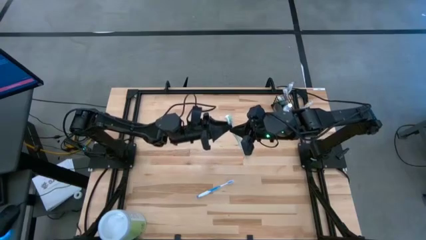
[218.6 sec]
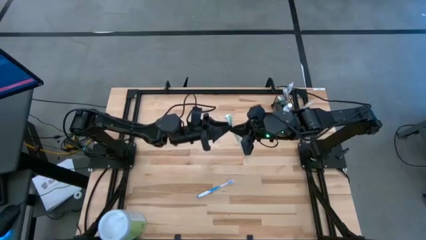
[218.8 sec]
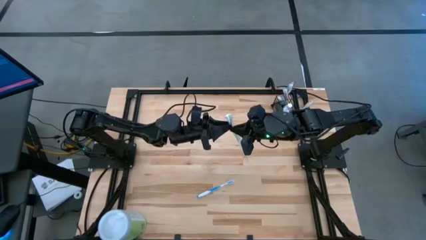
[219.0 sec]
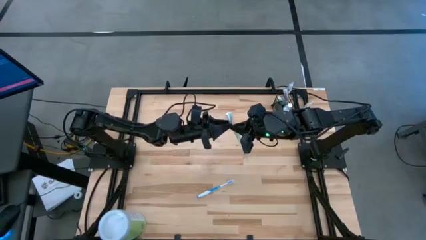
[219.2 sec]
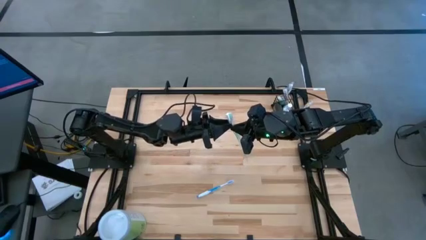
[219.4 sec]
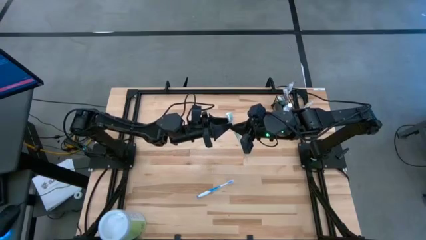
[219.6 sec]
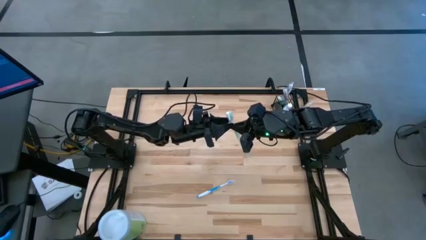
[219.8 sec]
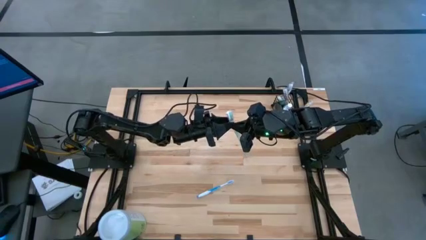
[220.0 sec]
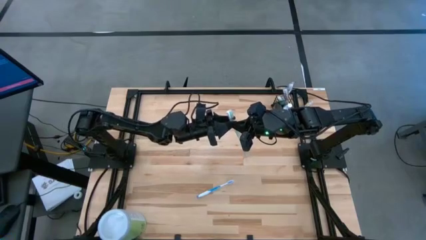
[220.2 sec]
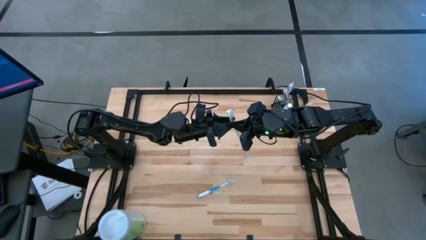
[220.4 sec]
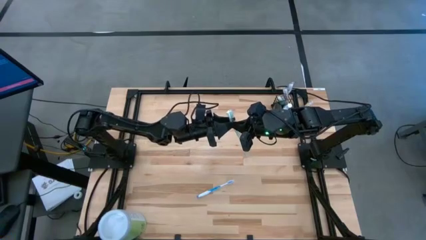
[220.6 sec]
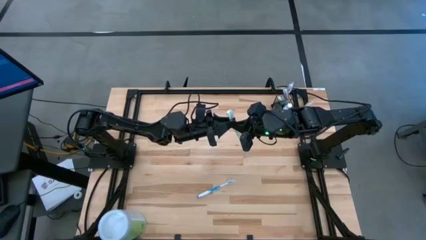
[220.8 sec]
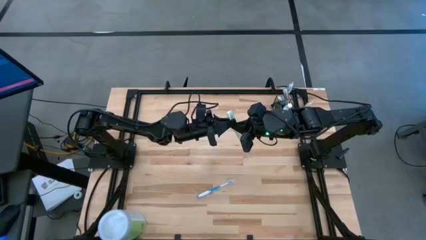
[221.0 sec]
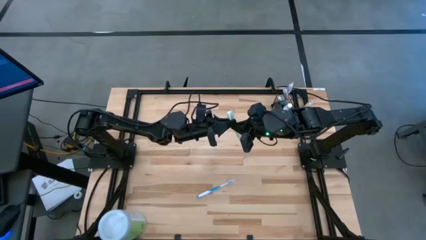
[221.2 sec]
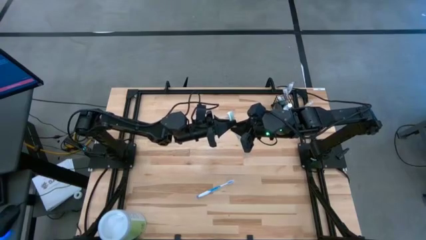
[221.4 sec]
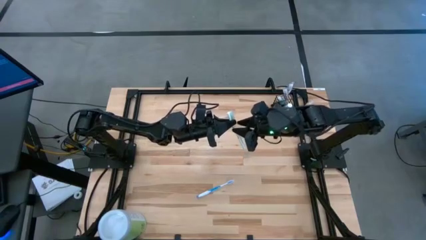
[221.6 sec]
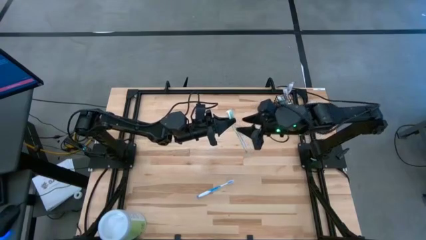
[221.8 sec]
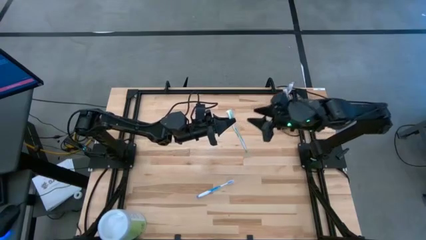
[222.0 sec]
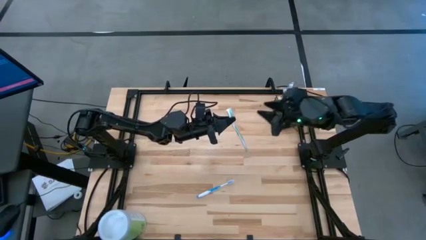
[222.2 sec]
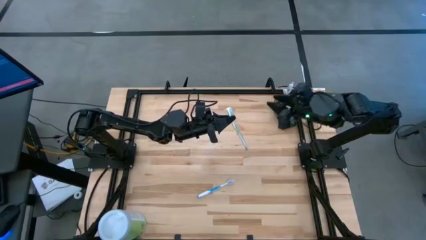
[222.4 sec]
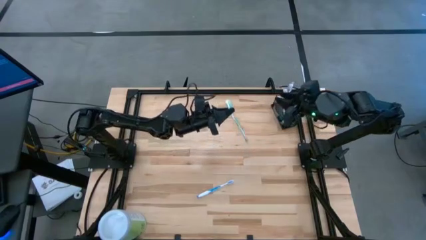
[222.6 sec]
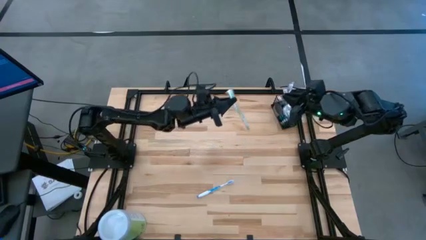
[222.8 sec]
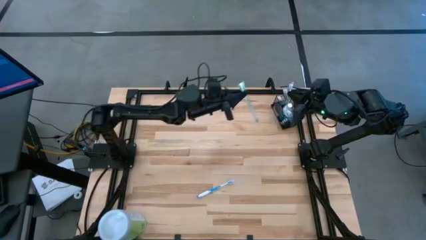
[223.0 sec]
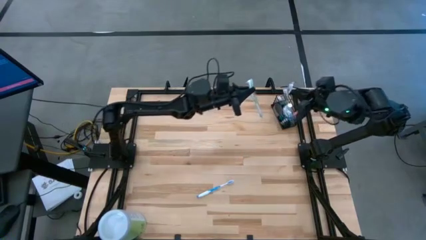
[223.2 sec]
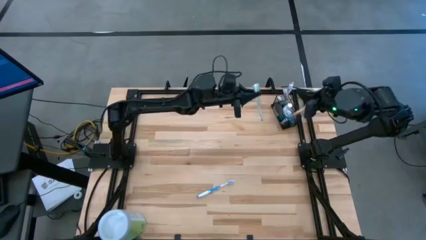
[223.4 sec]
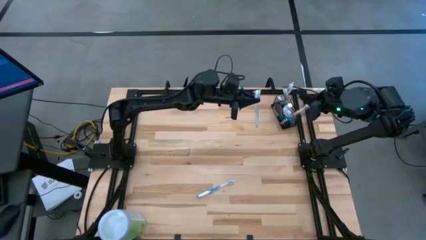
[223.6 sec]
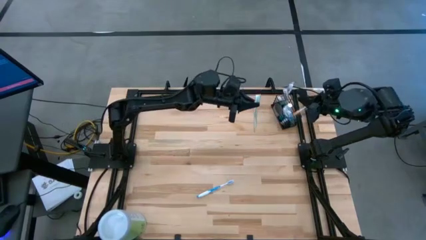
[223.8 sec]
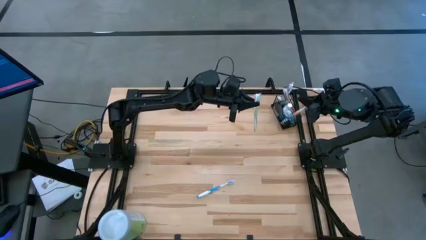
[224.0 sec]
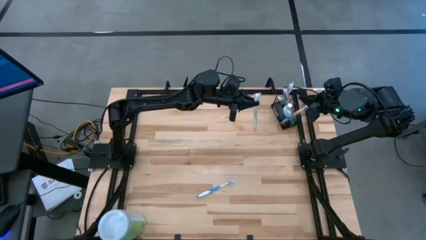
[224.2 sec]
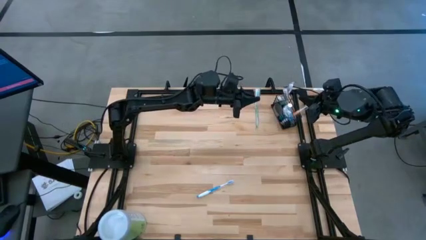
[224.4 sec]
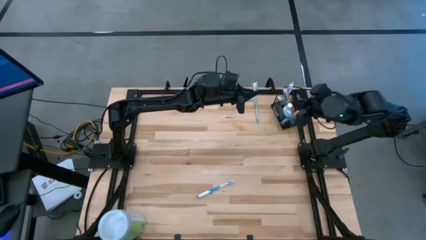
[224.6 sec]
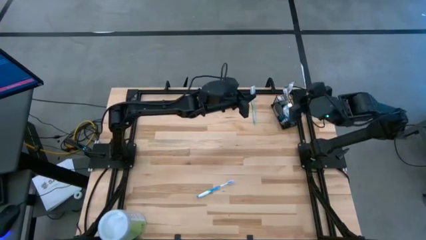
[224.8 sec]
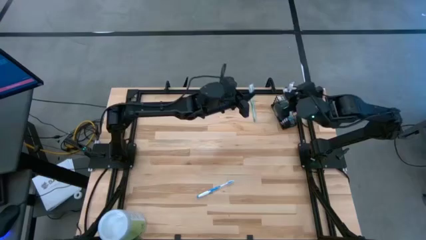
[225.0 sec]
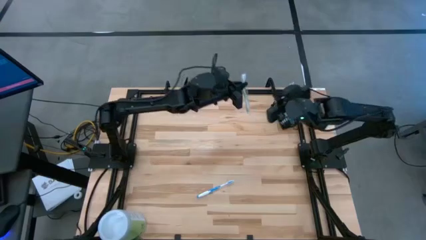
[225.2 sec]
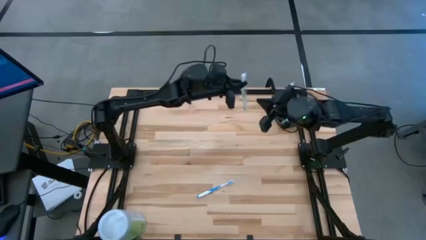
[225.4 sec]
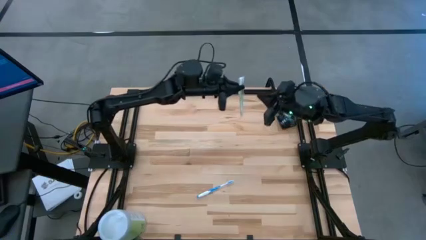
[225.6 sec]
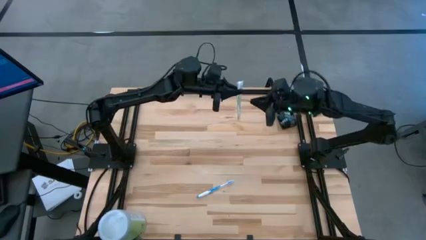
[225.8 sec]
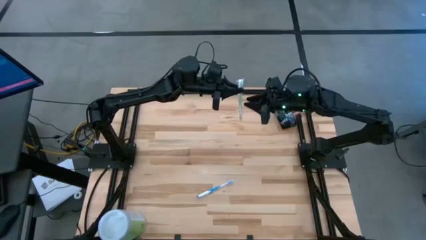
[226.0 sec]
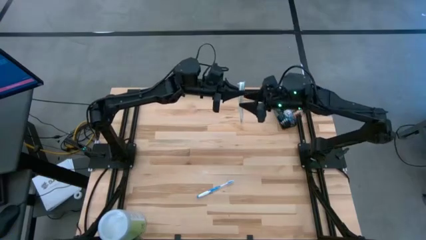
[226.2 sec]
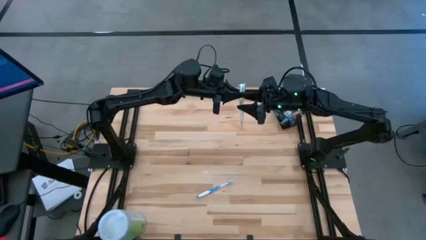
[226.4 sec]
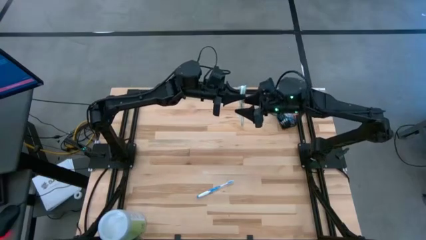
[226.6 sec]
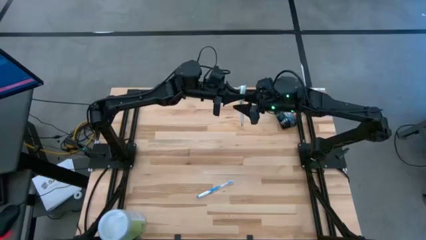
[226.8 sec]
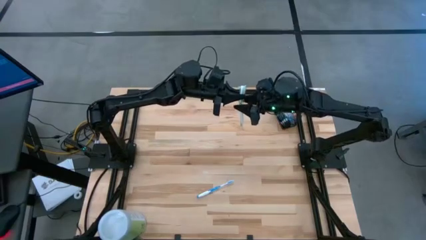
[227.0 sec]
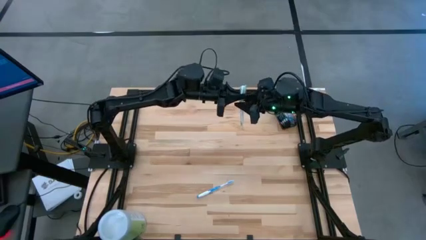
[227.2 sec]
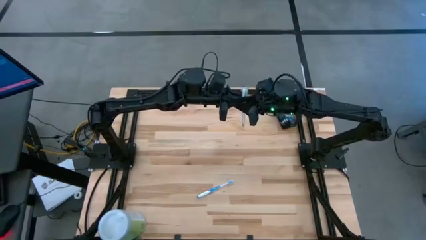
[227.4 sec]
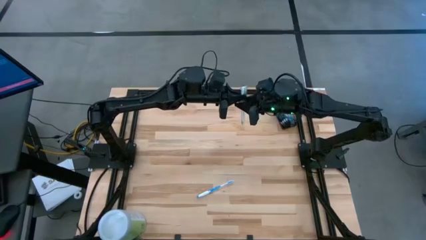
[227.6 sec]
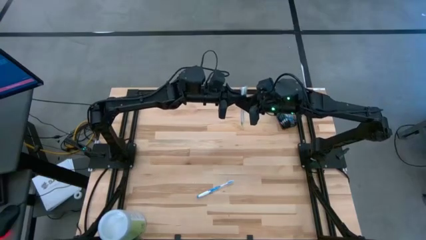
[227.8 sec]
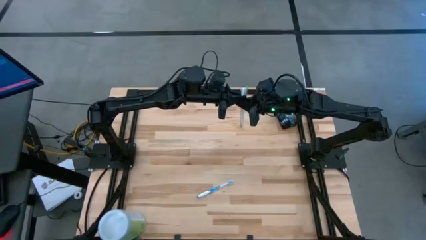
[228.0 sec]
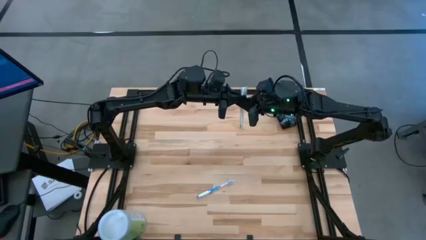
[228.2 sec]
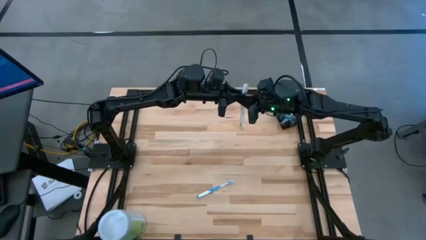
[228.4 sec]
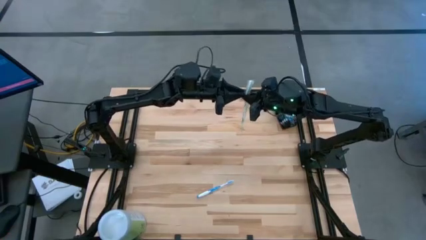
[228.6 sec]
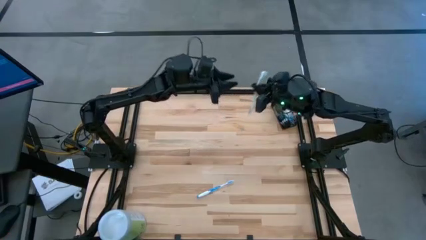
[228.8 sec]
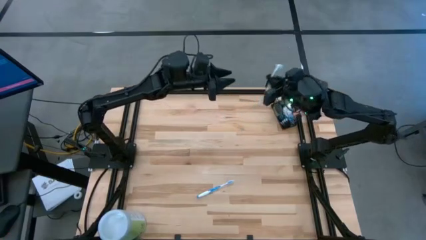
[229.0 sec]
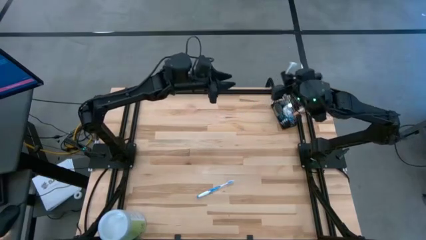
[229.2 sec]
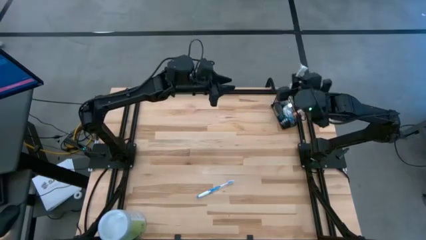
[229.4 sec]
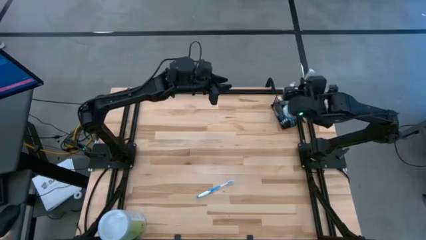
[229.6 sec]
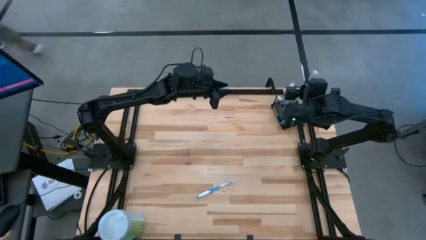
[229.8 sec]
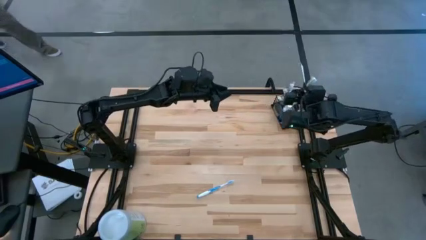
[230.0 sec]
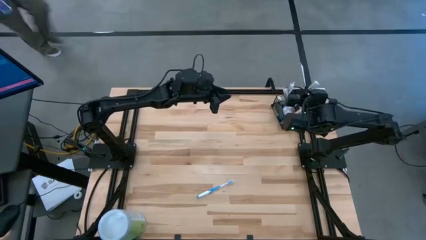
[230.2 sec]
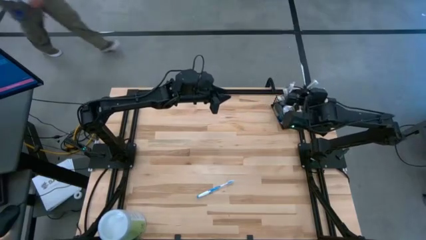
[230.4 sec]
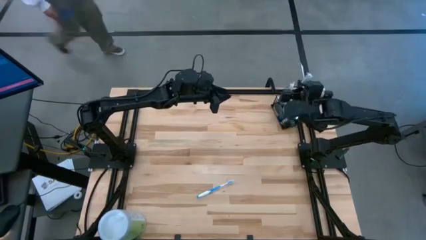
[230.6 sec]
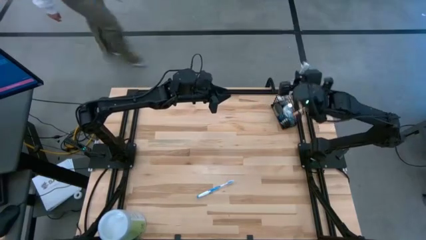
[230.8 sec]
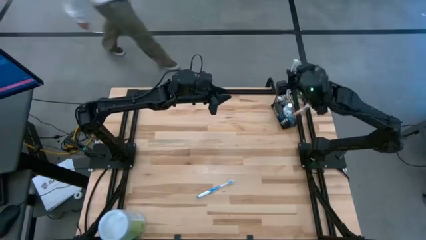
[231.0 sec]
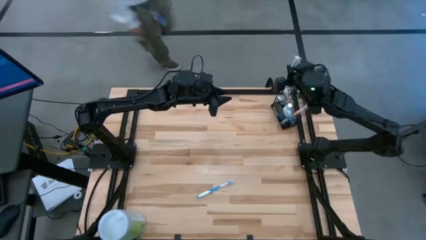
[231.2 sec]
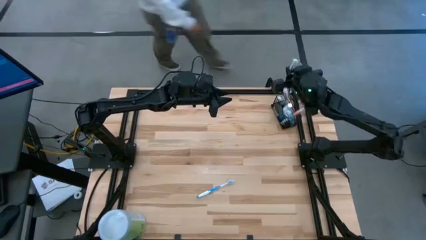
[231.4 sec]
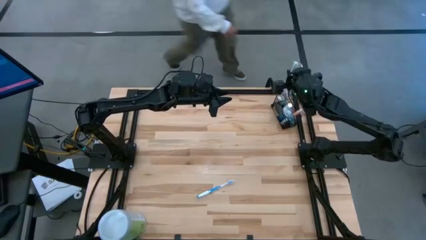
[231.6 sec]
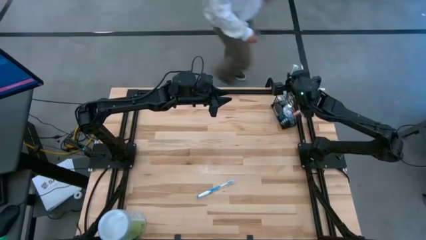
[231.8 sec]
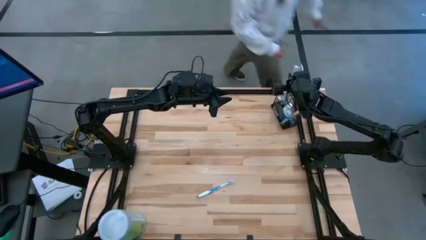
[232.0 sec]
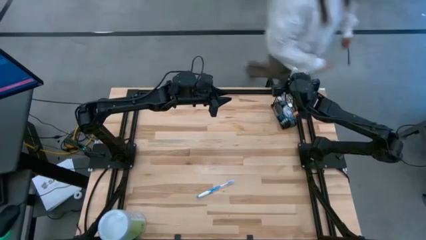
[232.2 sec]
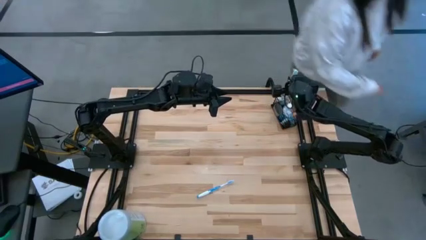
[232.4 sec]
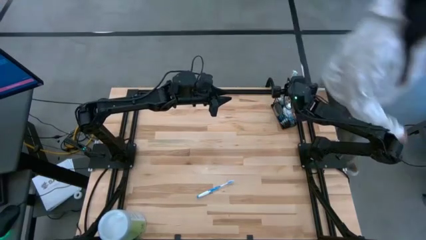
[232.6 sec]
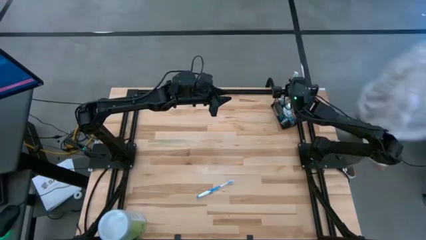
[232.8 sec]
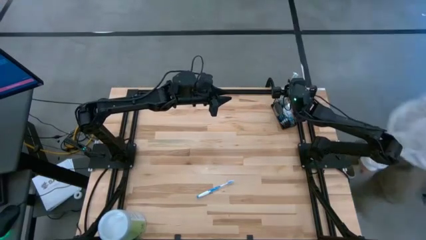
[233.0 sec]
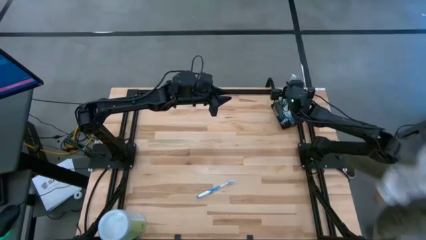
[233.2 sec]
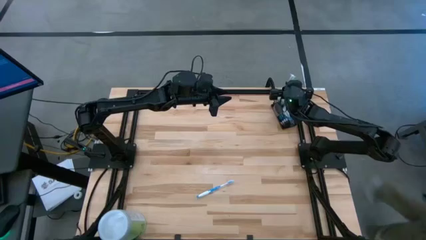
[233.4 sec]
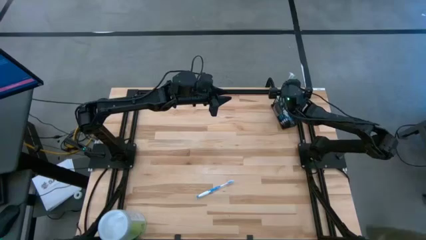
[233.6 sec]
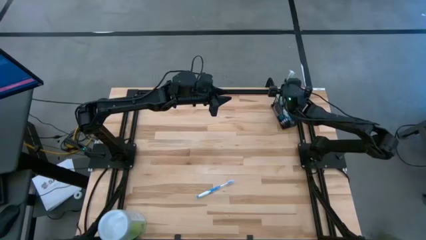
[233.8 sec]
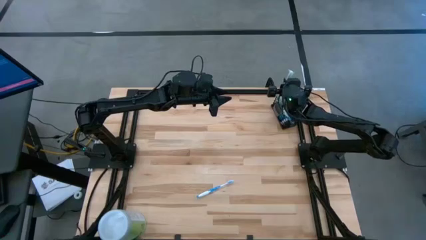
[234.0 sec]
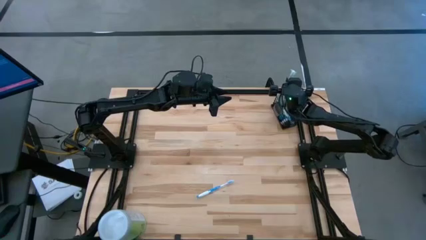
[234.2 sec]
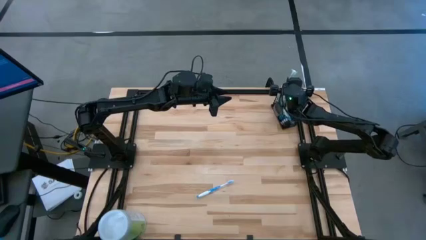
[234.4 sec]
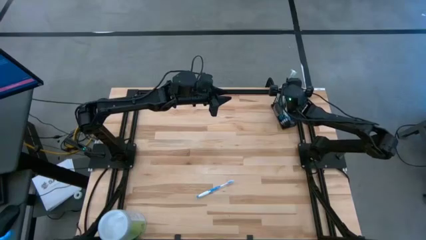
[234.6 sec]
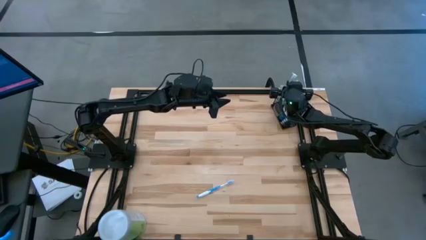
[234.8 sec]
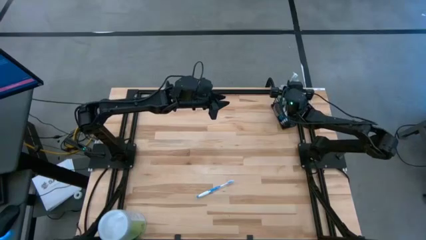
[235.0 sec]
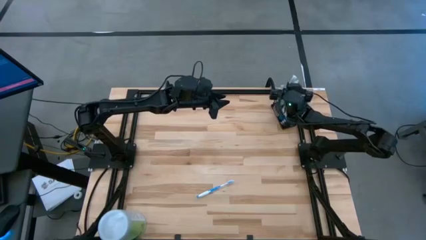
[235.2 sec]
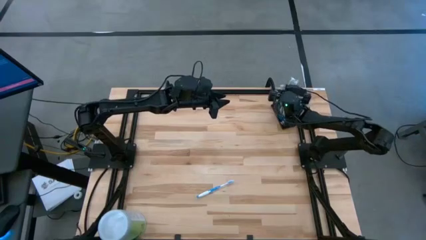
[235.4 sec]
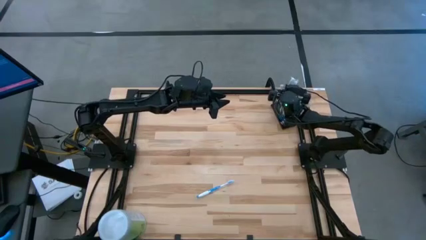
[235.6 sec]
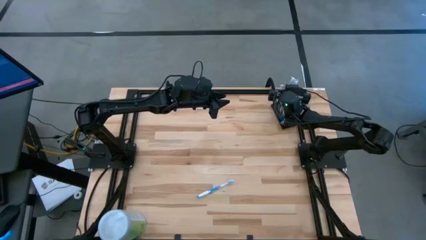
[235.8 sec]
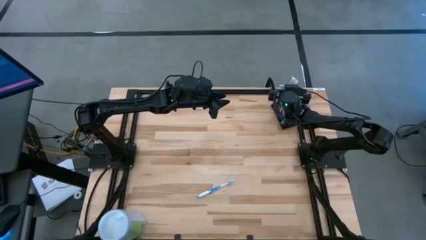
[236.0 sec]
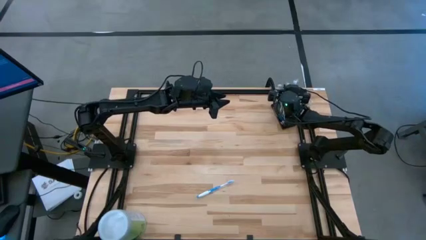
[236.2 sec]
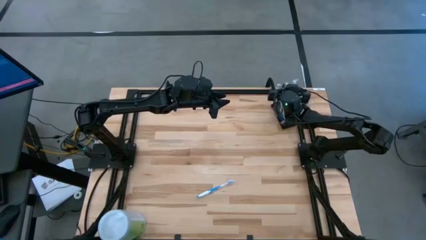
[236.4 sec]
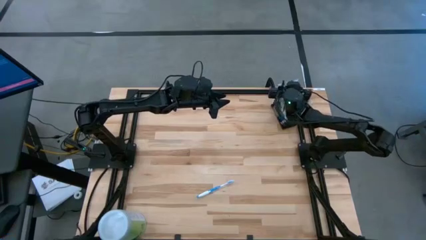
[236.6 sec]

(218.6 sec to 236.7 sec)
Task: Pick & Place toothbrushing station
Put the green toothbrush in the left section of wire organizer
